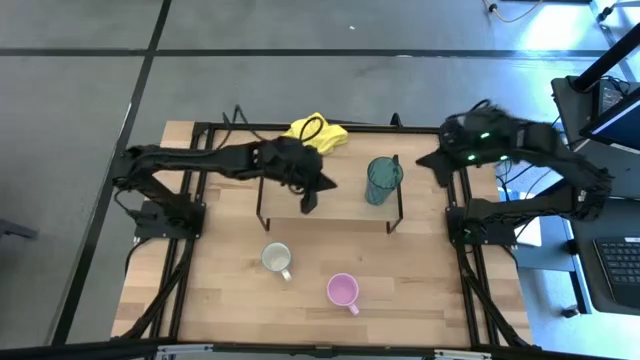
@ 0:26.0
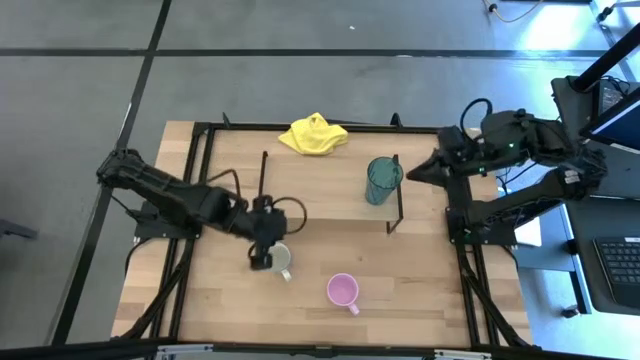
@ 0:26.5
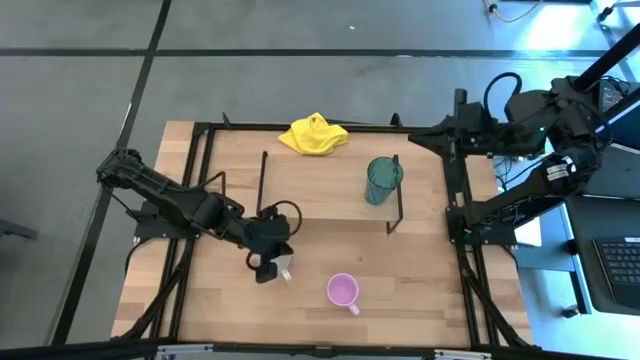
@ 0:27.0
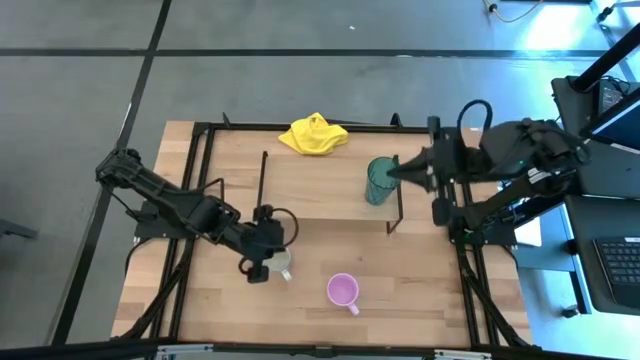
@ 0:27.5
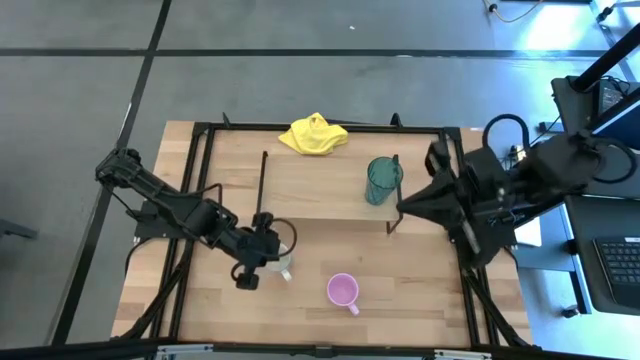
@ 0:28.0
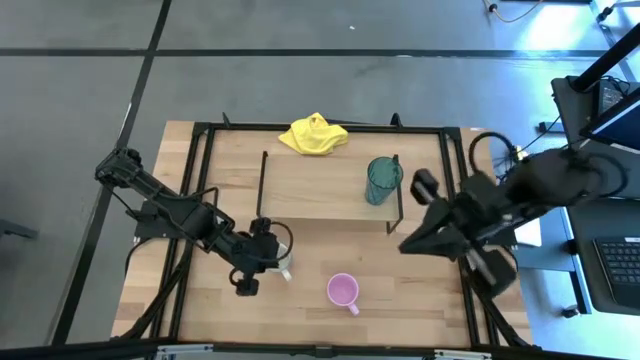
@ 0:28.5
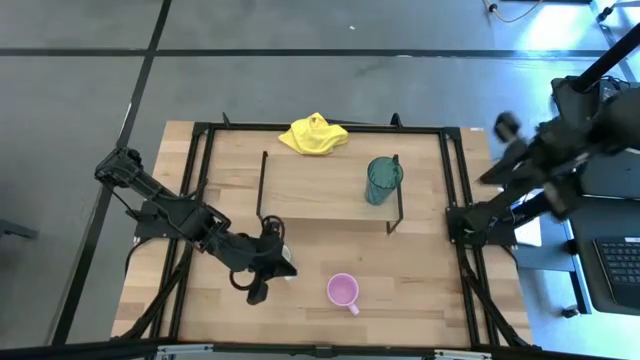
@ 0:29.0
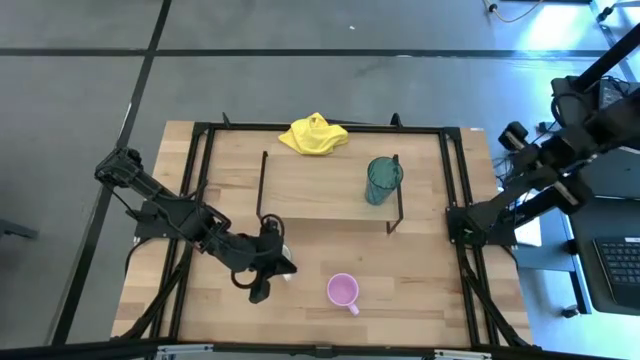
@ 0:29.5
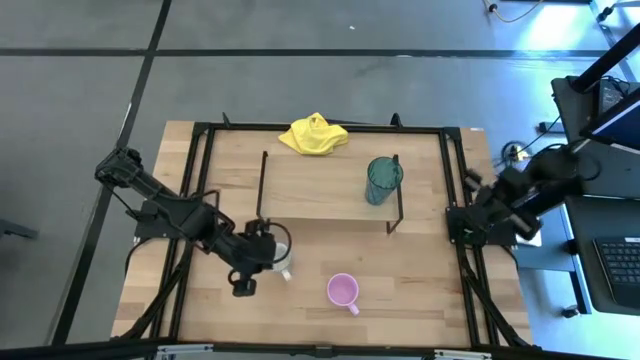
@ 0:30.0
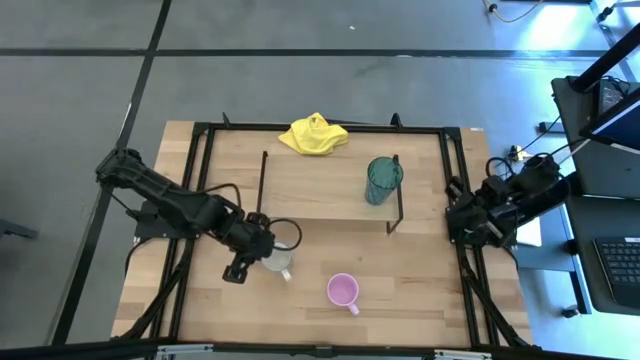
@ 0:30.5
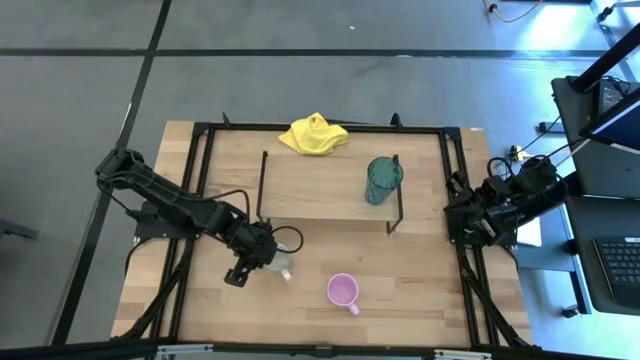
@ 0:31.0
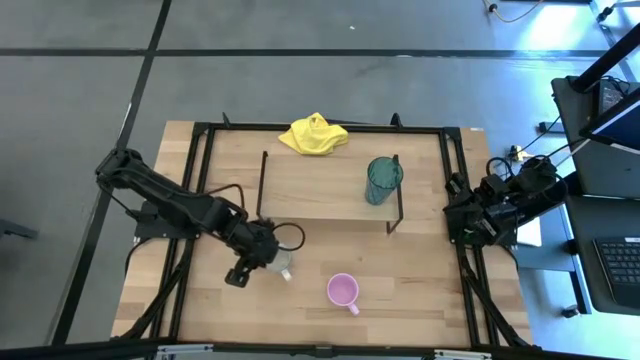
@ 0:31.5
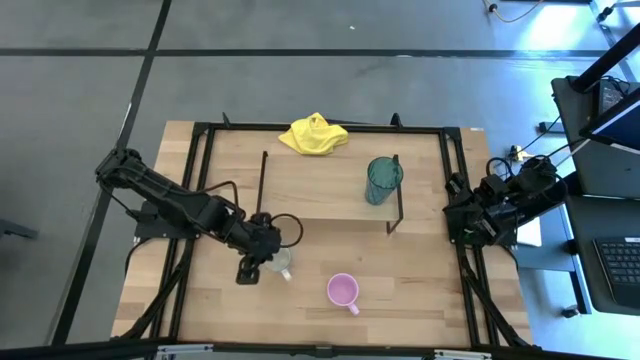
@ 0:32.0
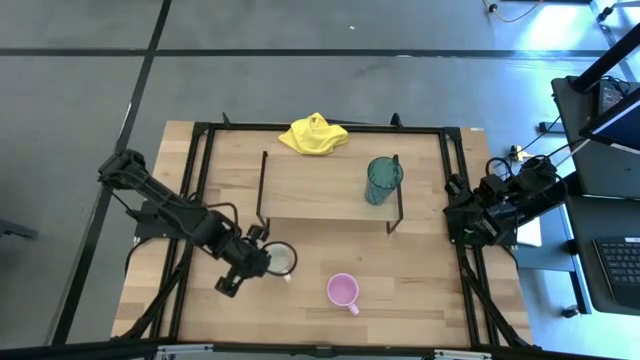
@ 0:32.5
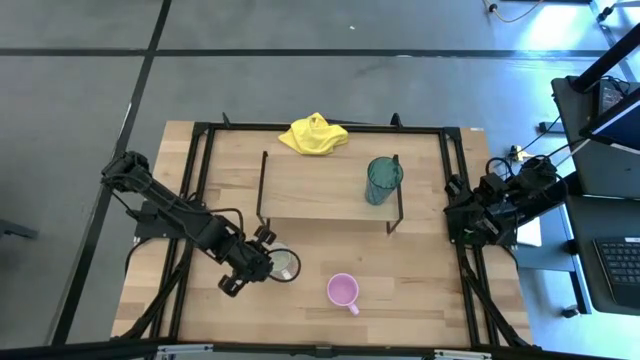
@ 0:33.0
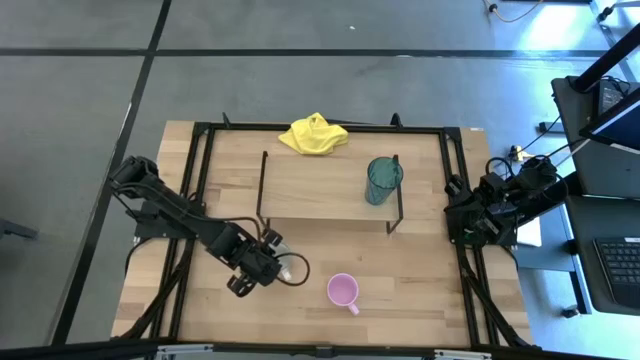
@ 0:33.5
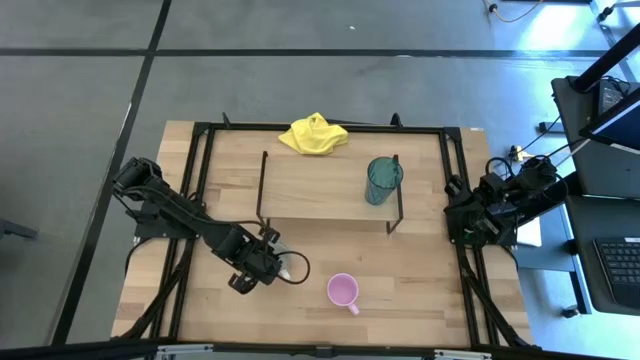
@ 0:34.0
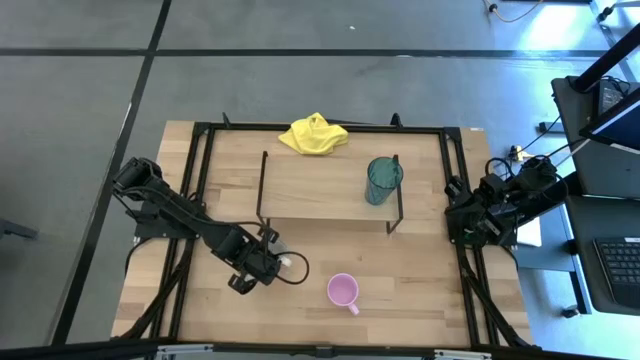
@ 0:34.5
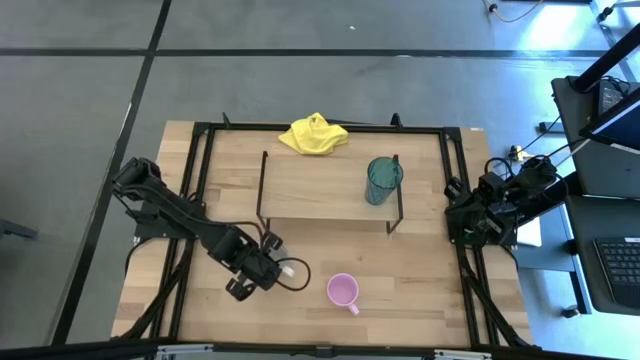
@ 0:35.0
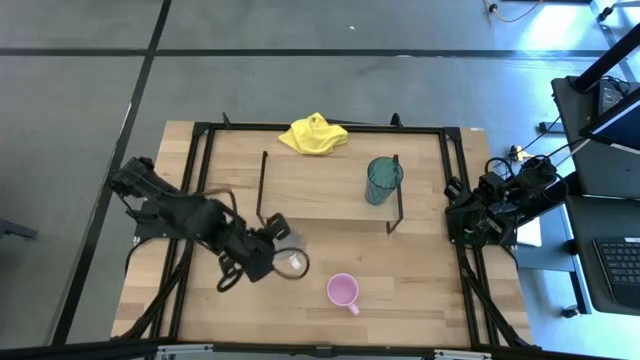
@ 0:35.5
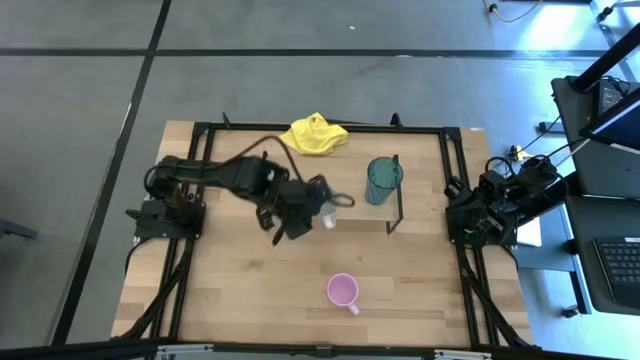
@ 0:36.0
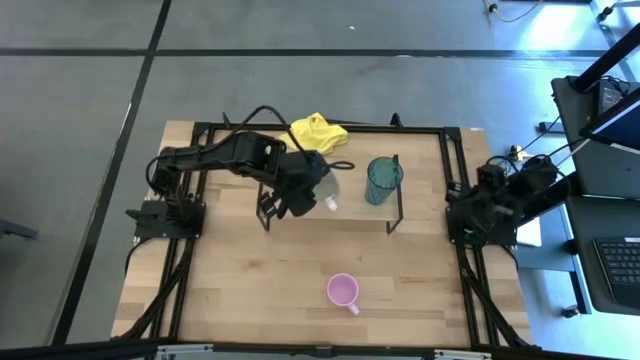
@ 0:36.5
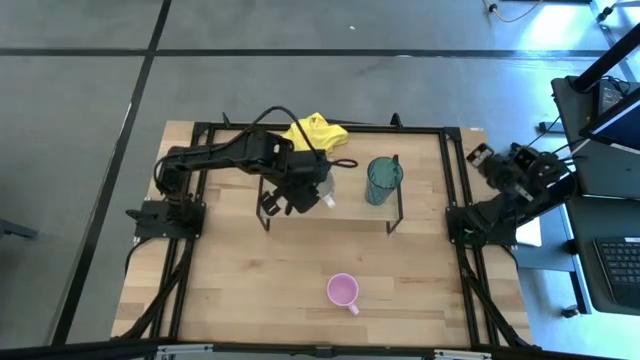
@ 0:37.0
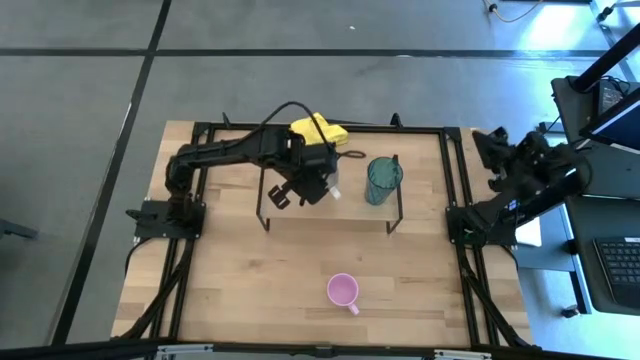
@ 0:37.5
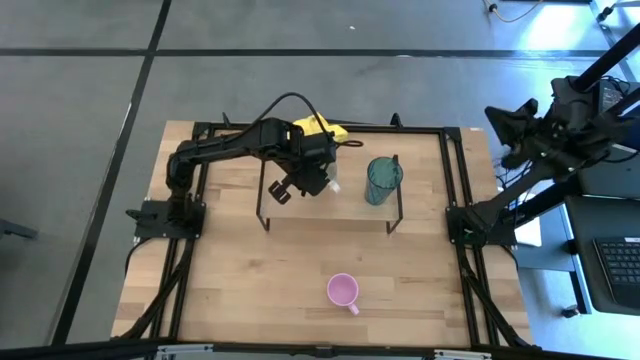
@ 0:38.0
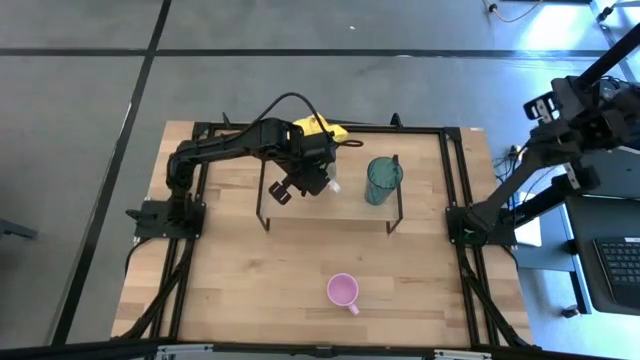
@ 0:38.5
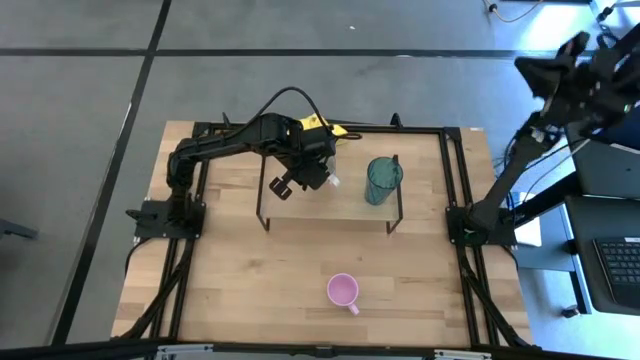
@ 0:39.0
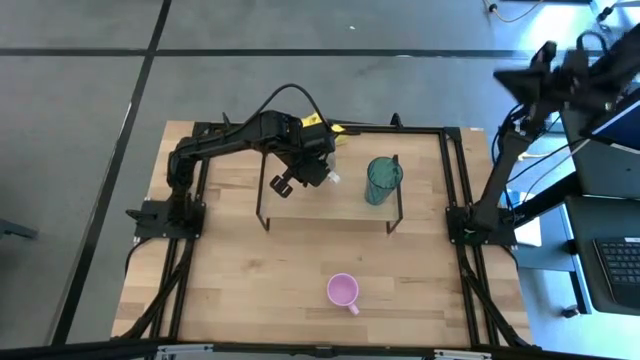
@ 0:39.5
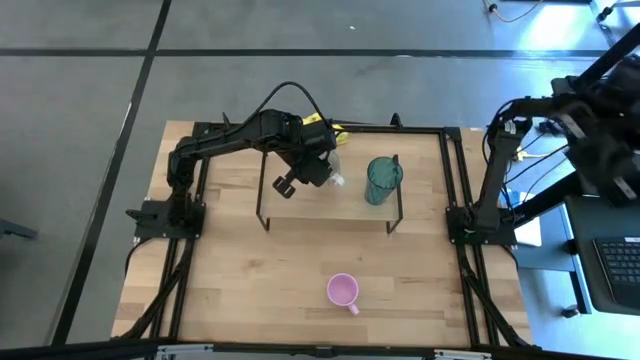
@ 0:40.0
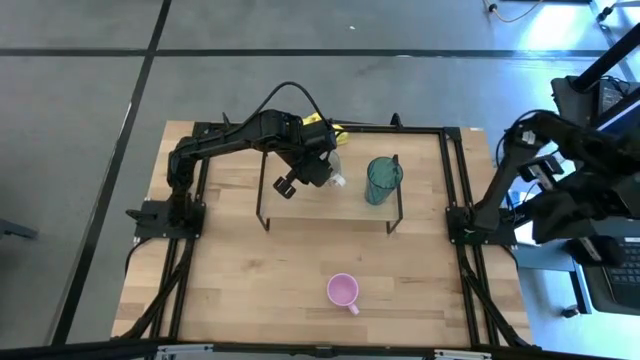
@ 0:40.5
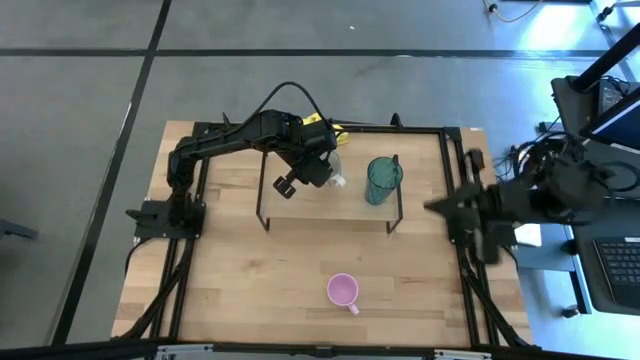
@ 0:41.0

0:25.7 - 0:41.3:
Task: Stack small to large cups/mugs on shelf
Put the red mug on the shelf

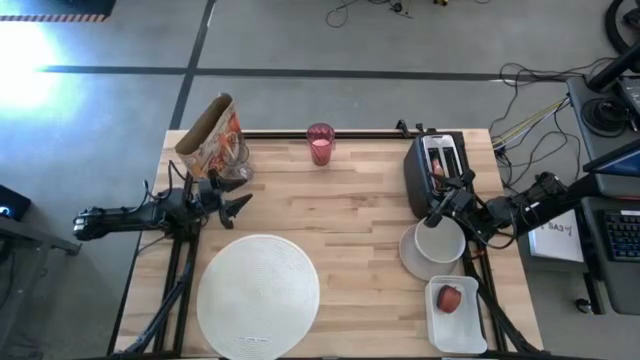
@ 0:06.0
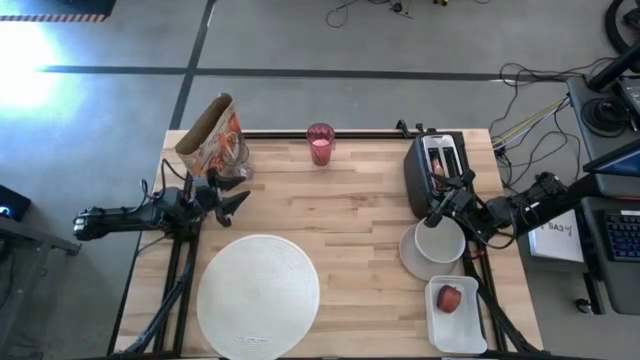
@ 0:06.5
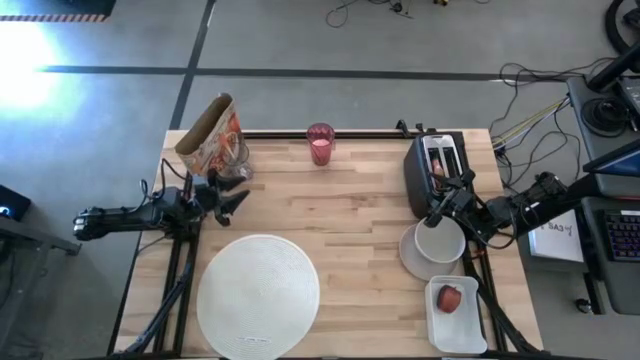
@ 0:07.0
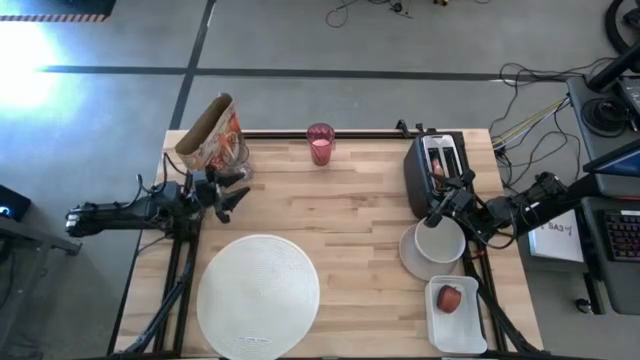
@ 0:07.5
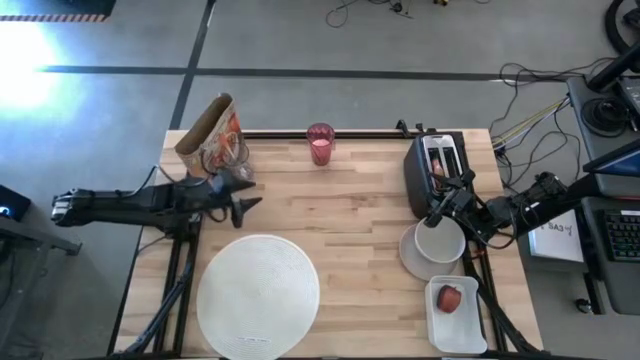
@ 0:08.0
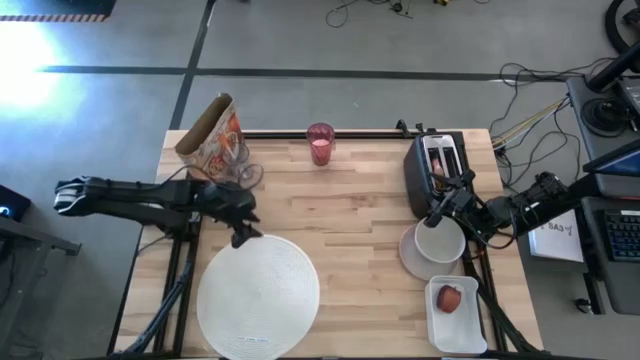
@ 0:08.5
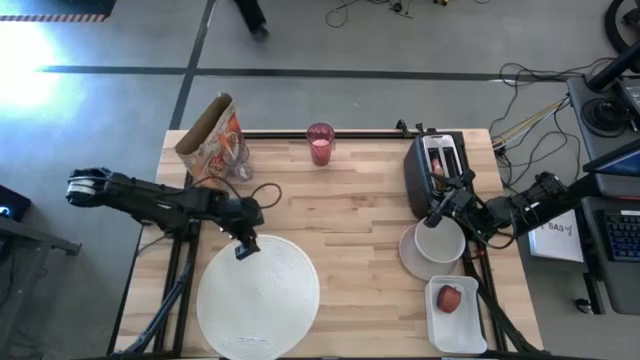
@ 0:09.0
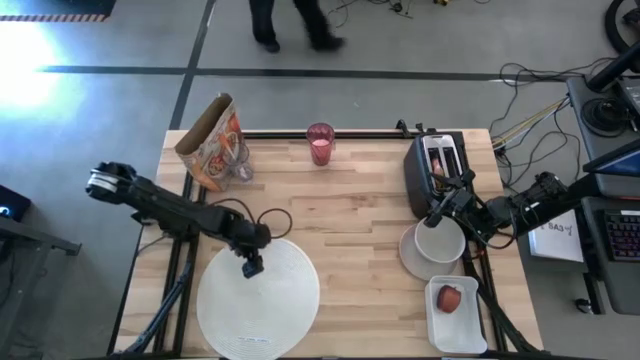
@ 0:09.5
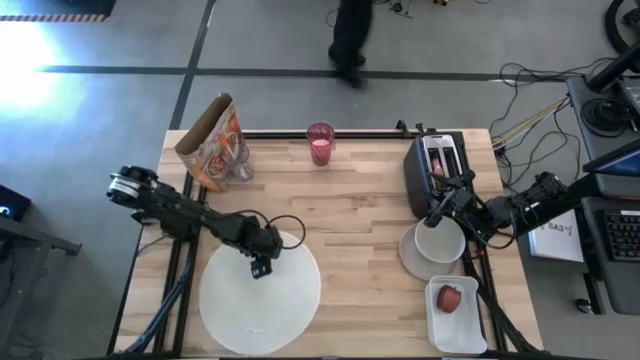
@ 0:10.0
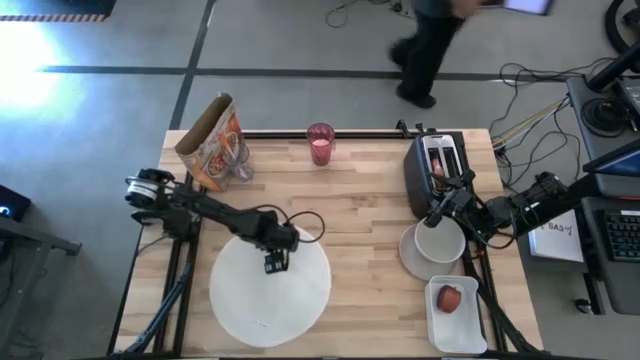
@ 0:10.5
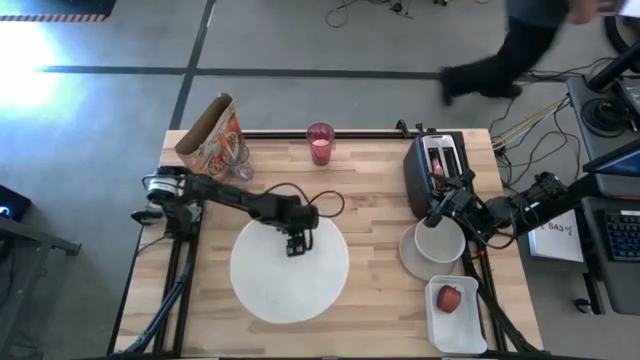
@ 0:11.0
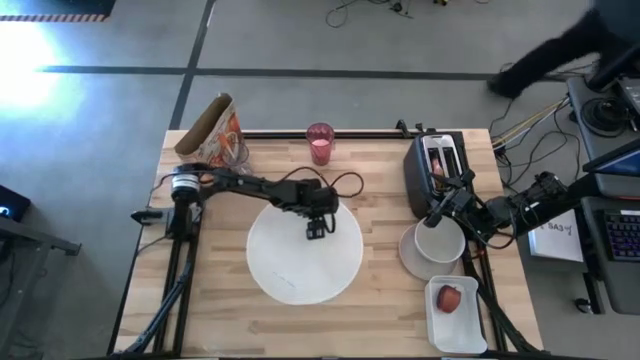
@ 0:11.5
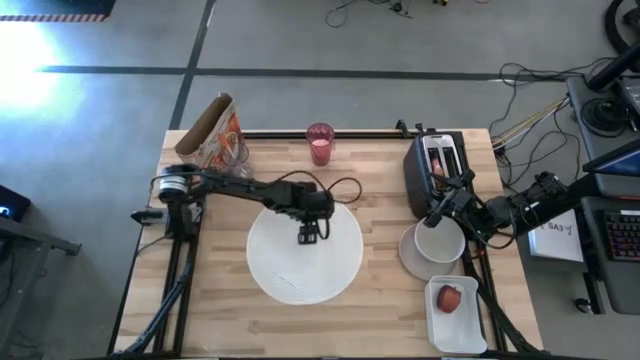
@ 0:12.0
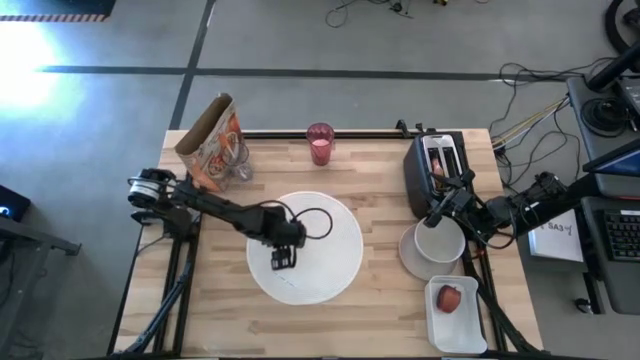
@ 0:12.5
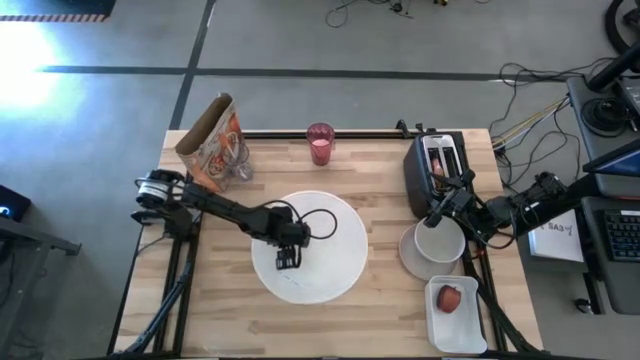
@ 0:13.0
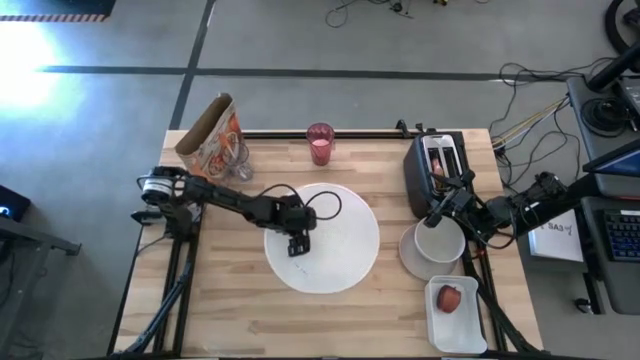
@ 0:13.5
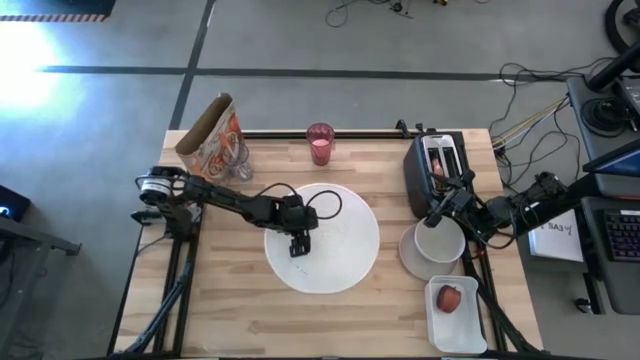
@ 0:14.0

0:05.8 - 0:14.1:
Task: Arrange a breakfast setting
Move the white table mat to the center of the table
